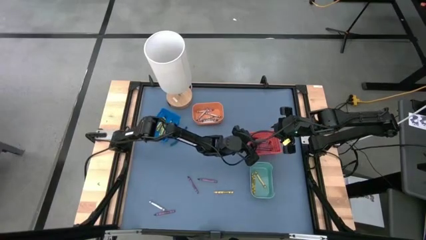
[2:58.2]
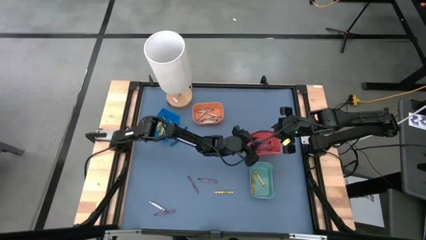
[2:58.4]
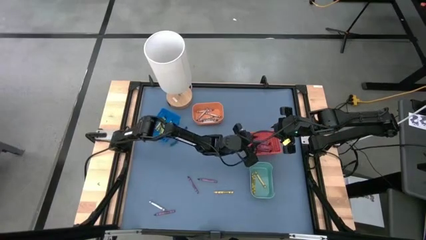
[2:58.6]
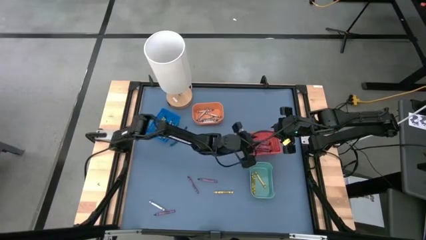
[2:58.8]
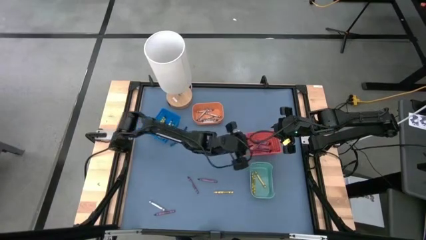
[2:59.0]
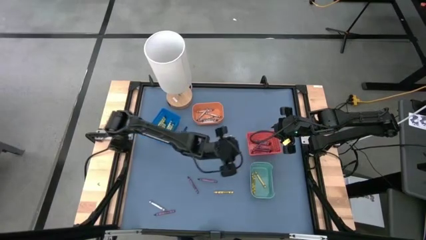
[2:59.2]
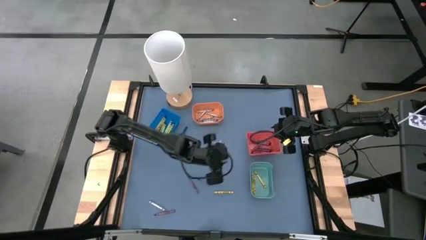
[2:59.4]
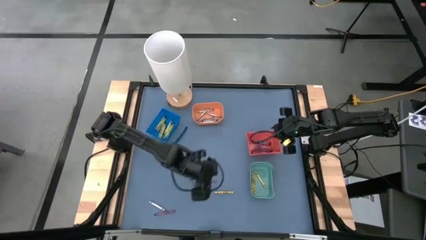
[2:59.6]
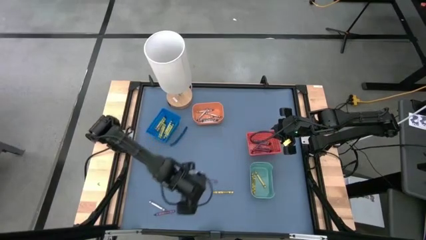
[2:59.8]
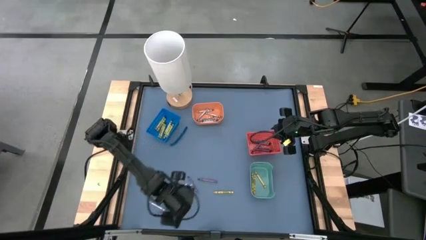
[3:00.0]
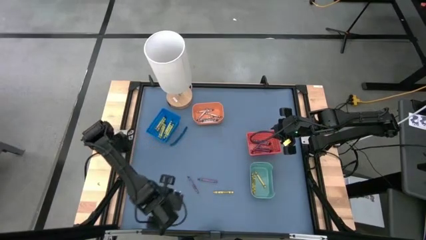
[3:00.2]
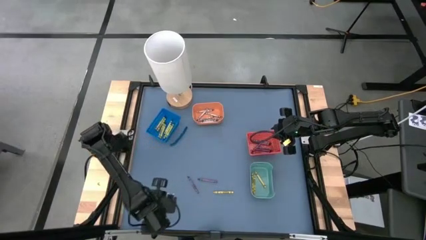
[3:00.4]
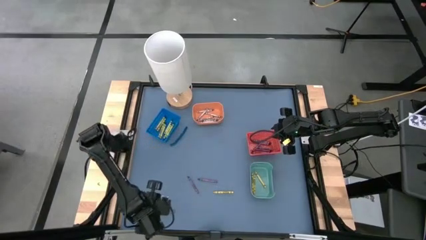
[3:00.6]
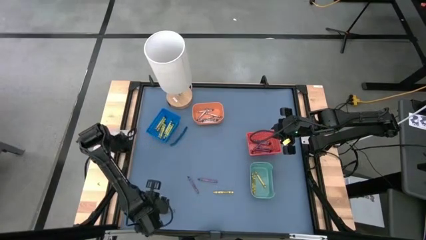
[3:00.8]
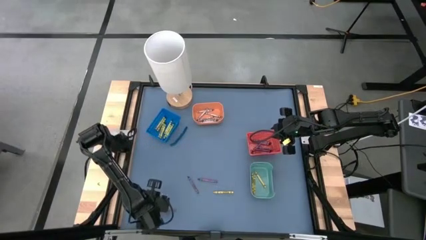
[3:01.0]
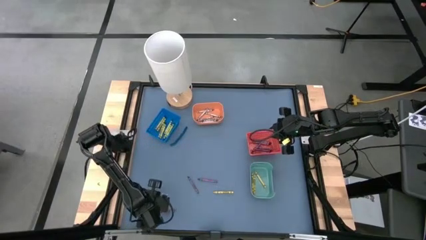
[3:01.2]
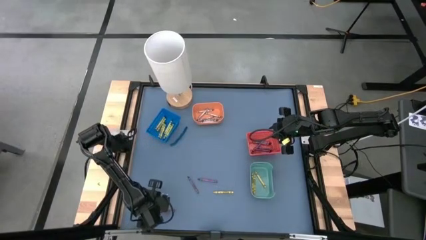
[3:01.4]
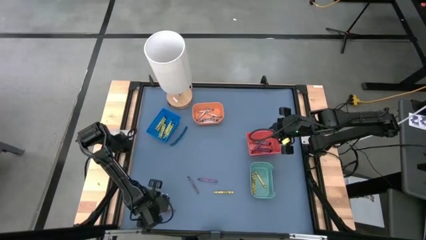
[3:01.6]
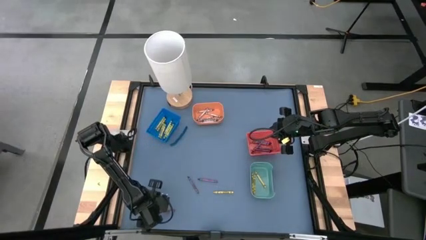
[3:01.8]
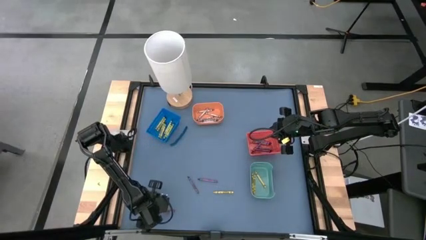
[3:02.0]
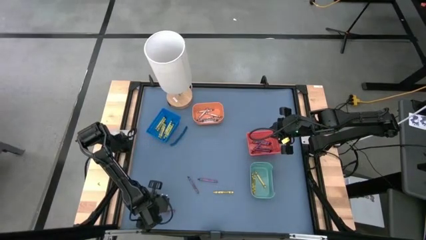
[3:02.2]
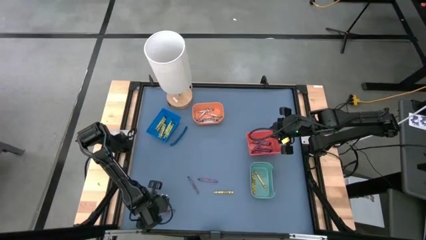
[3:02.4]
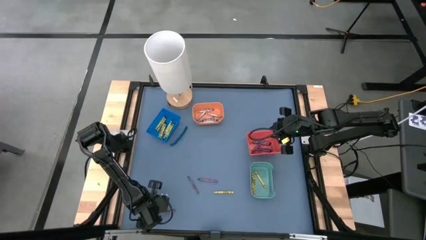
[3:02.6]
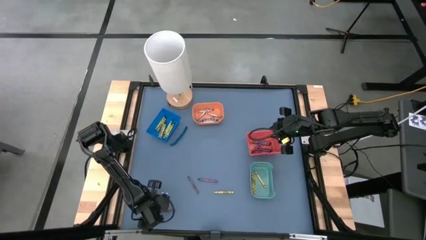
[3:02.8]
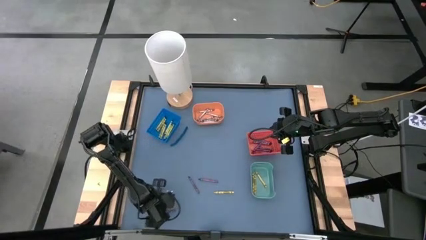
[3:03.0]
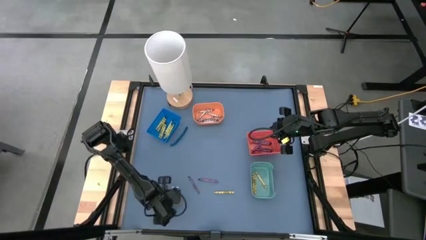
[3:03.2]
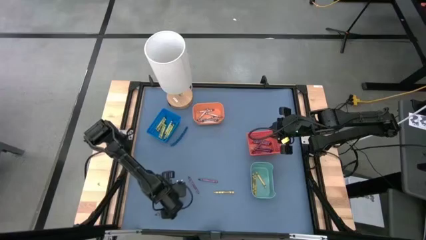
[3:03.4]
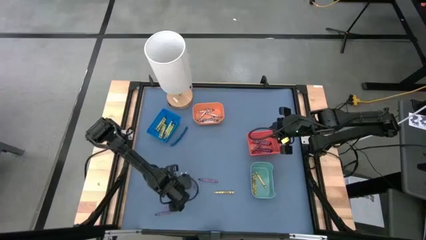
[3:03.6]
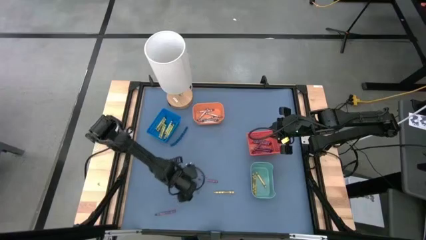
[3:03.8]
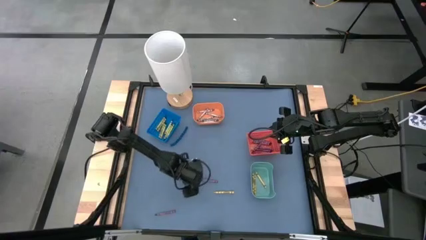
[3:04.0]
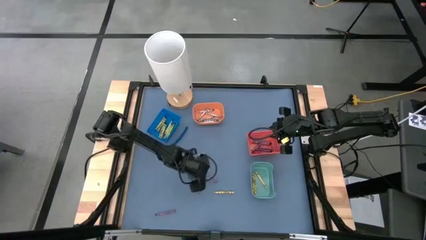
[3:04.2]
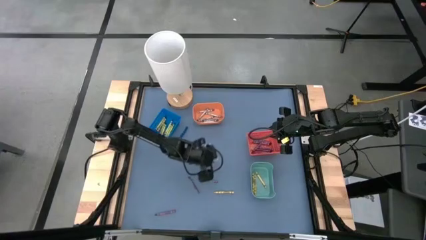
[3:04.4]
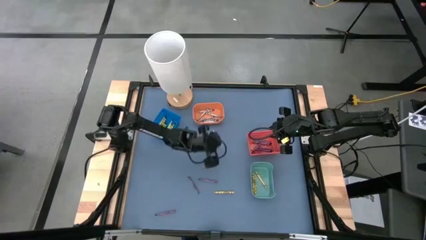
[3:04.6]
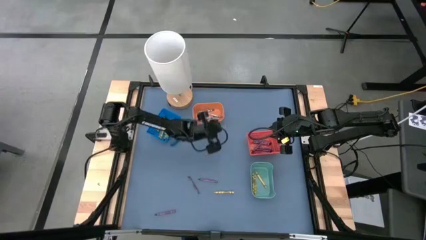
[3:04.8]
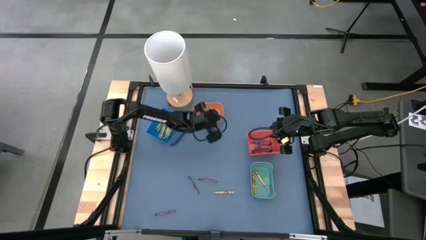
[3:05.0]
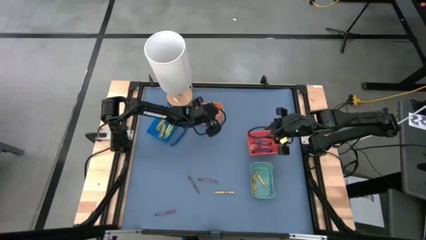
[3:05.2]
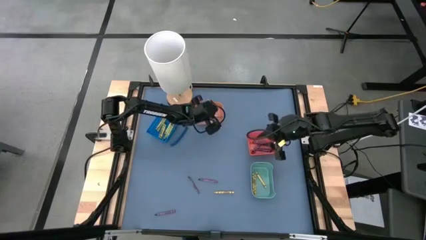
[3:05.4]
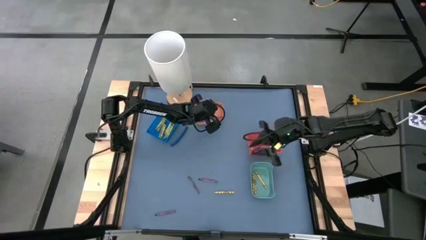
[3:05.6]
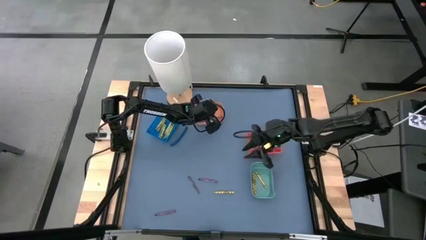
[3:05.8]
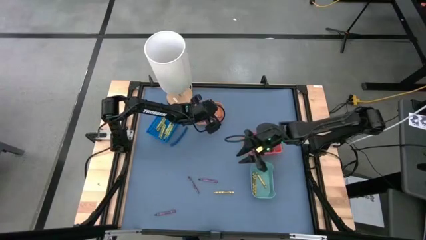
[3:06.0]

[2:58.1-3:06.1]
Task: Sort crayons
Put the gray crayon into the orange bin

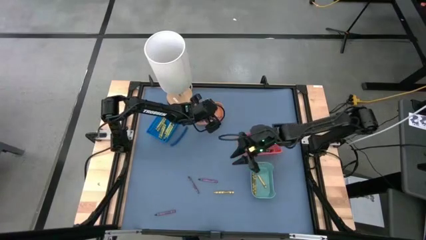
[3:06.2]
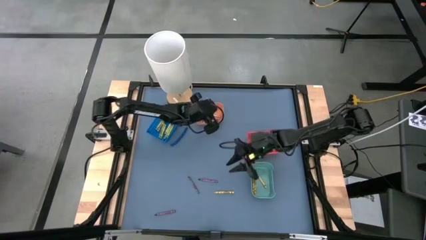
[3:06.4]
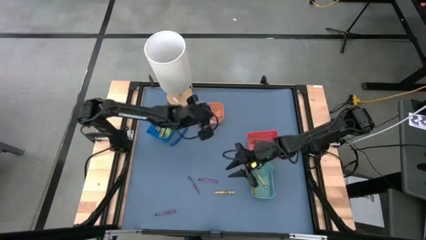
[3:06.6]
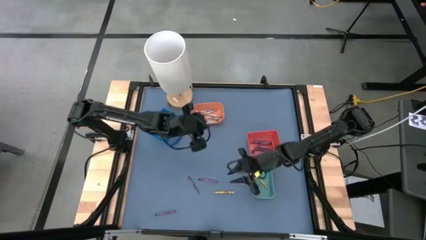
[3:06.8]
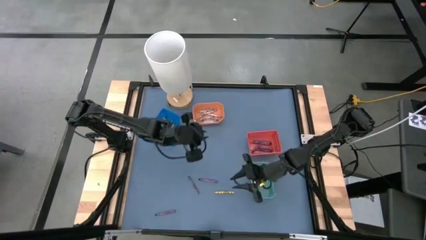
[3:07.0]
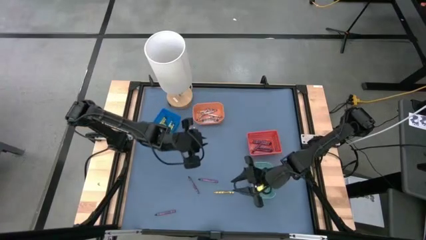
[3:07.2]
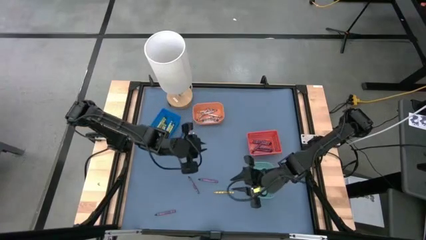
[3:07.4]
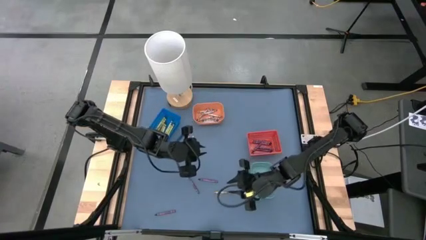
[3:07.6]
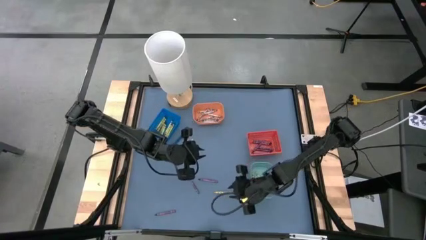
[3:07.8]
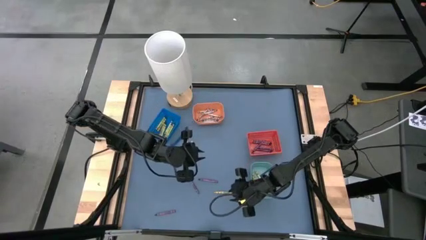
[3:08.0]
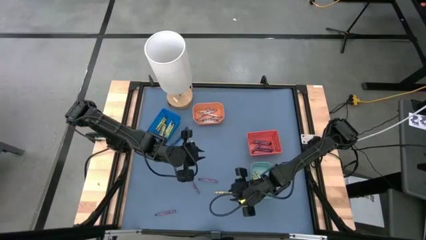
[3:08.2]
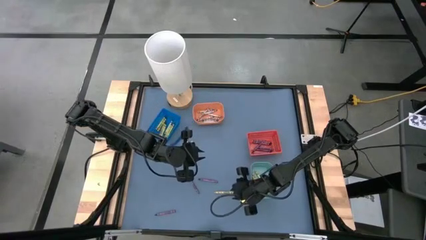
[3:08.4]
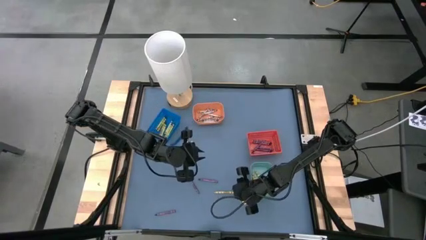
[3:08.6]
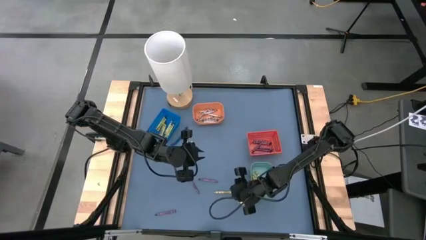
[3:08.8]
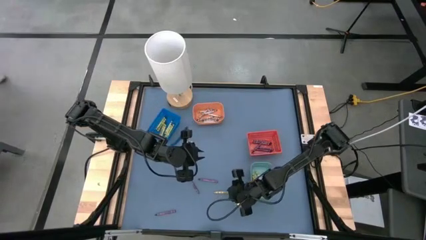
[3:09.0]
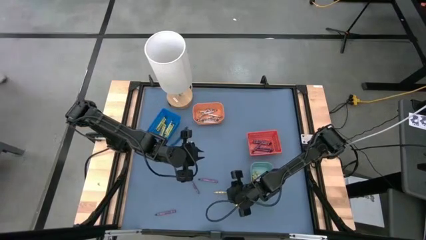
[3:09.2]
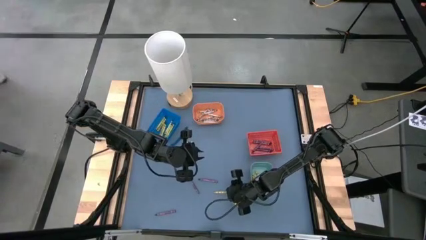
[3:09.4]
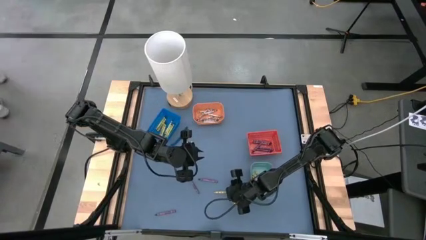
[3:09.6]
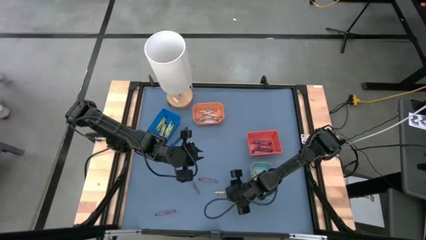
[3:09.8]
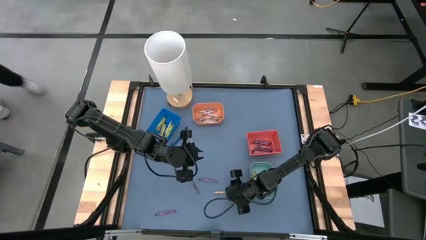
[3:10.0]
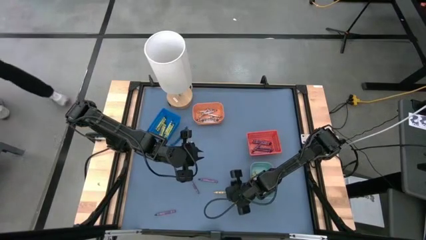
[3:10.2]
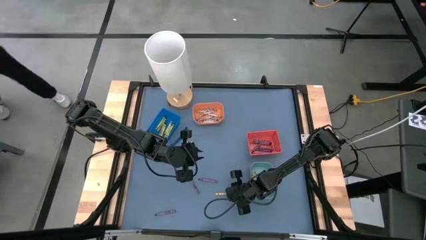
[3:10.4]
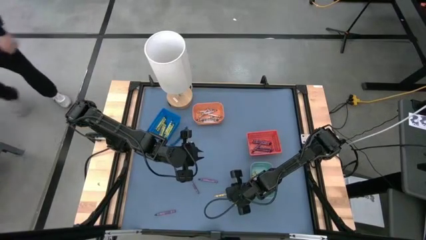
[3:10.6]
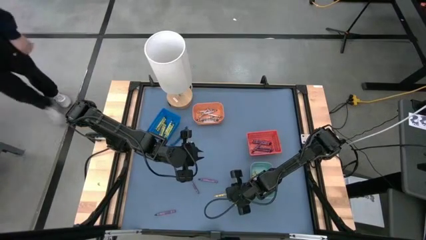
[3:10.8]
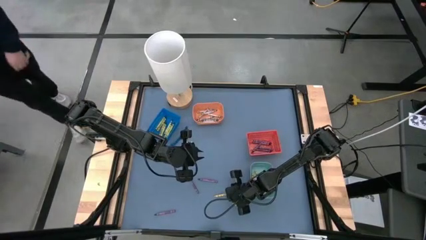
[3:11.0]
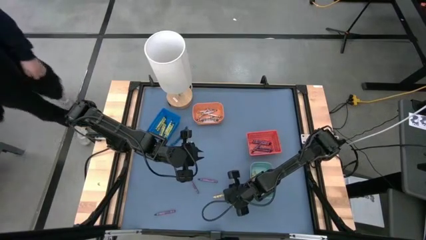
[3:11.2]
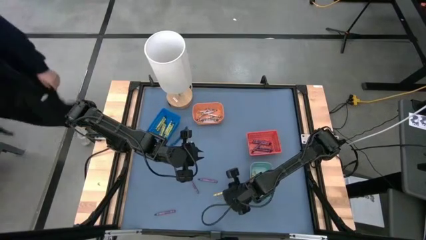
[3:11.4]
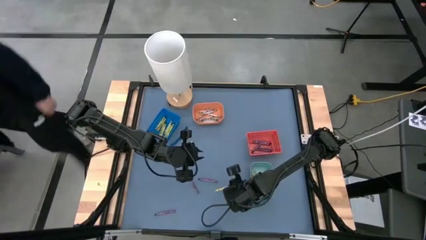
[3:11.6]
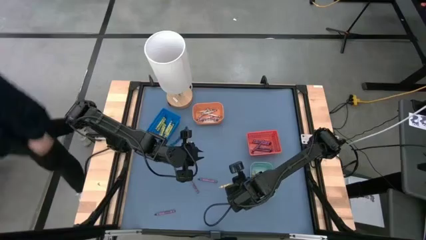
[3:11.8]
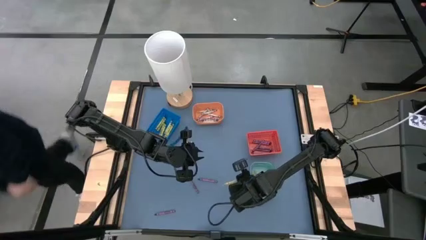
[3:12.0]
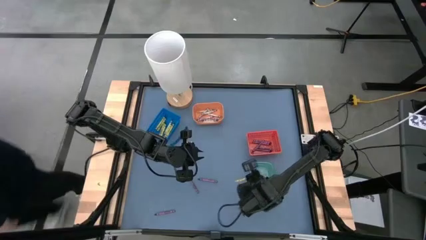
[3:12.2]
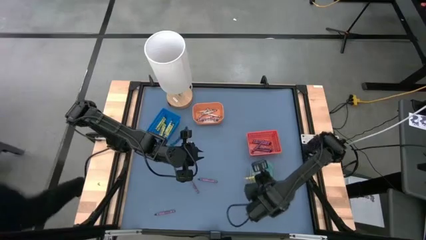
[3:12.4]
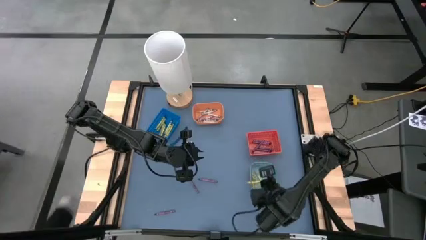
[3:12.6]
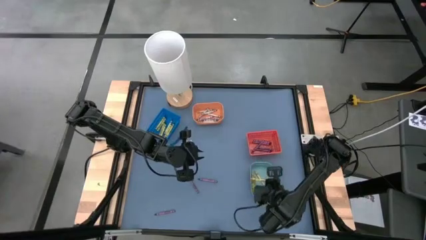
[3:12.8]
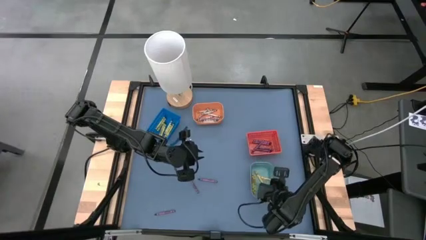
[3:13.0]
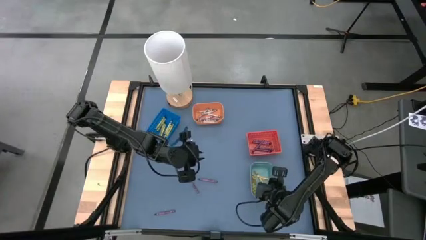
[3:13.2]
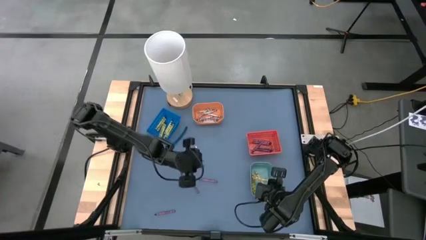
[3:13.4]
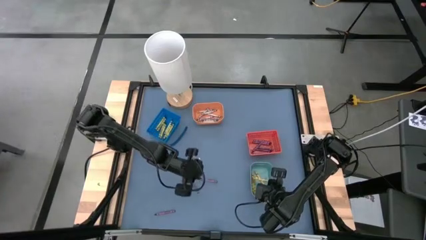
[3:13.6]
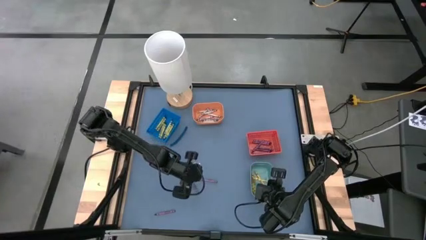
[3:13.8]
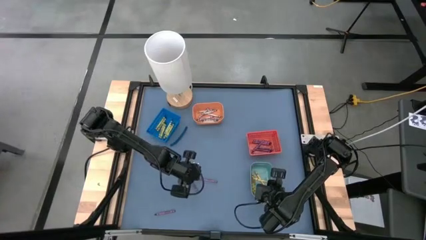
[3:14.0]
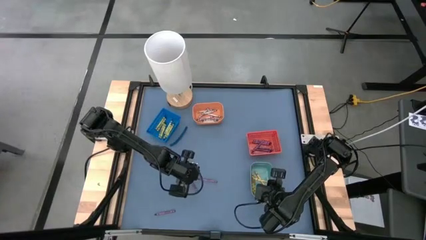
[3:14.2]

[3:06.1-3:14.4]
Put the yellow crayon into the light blue bin
